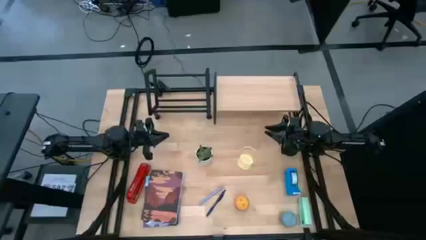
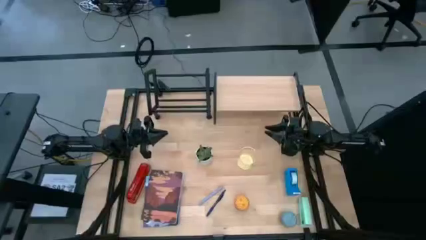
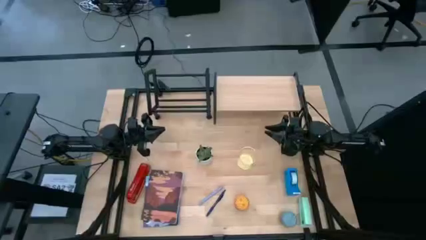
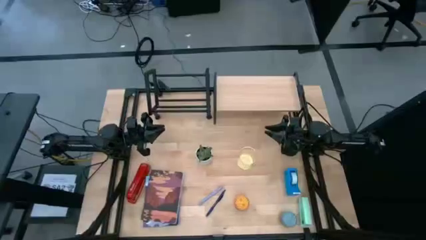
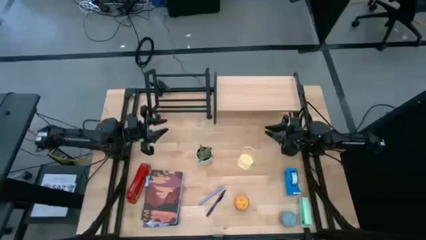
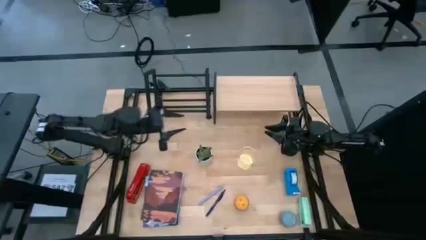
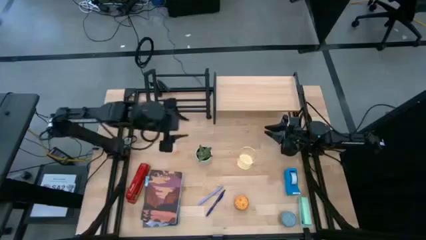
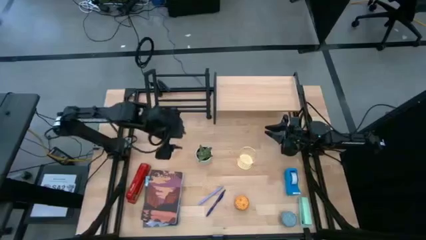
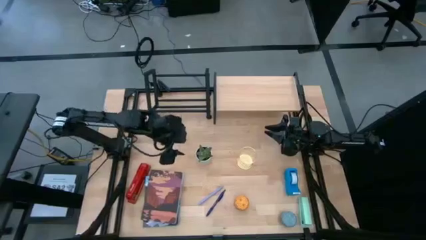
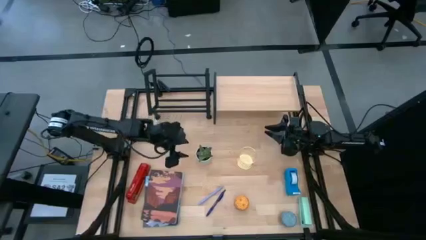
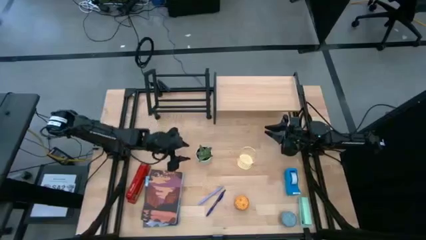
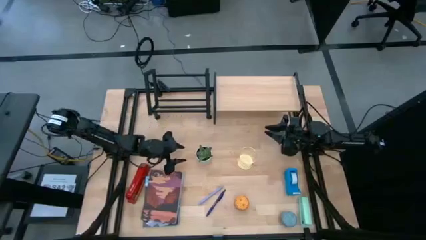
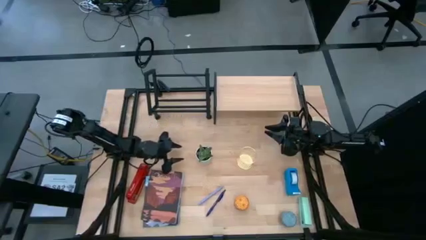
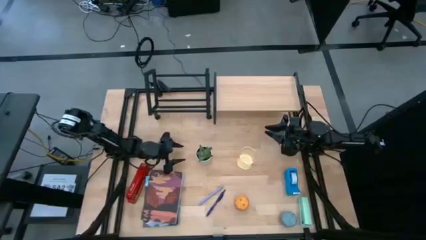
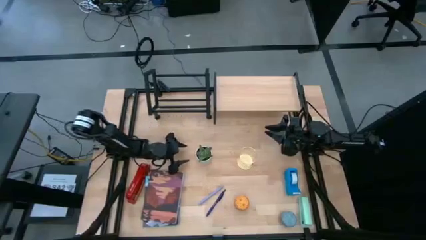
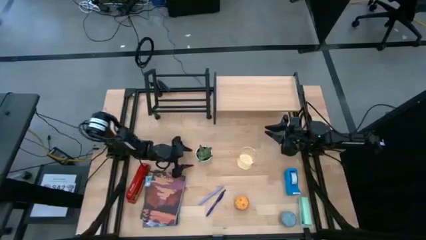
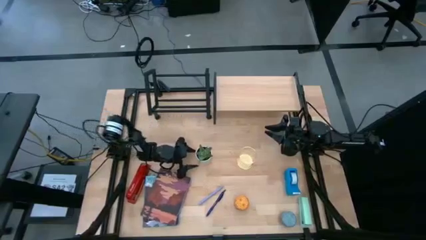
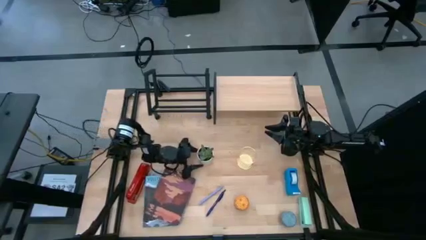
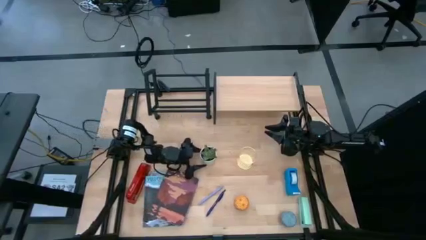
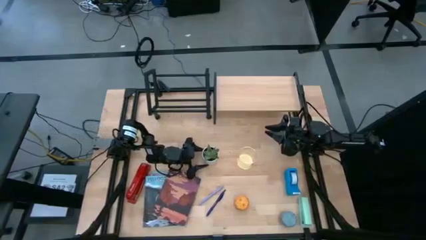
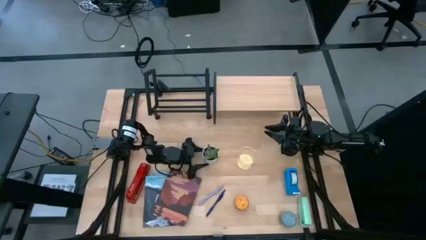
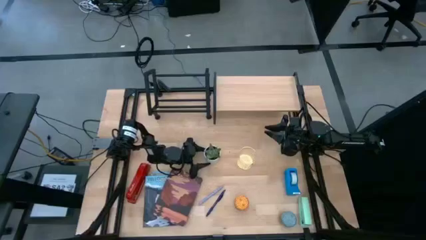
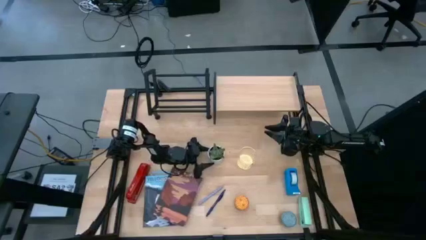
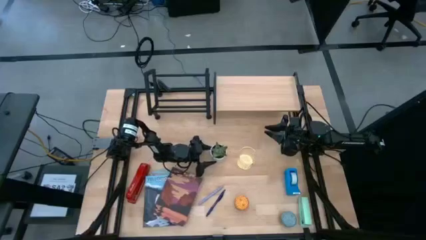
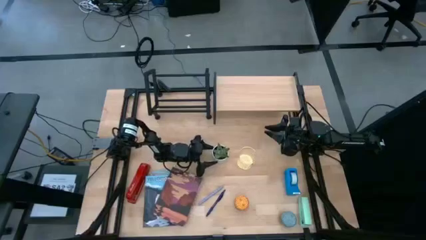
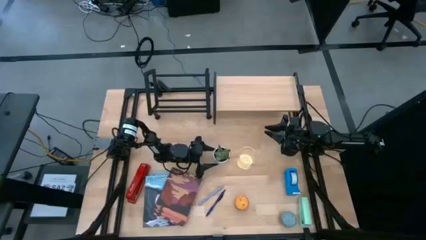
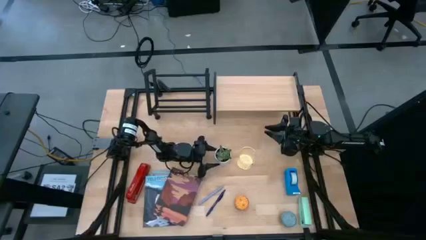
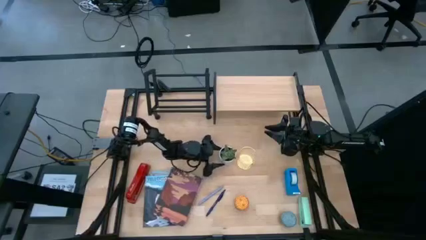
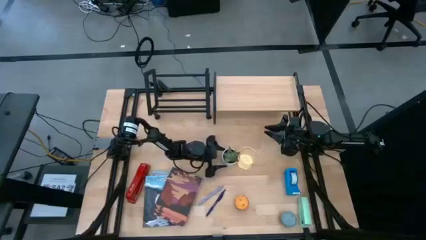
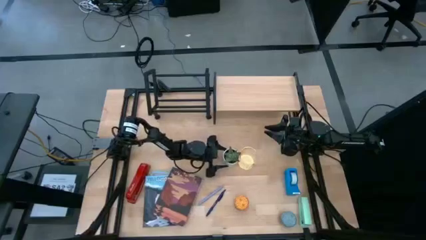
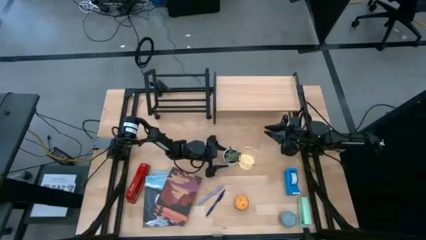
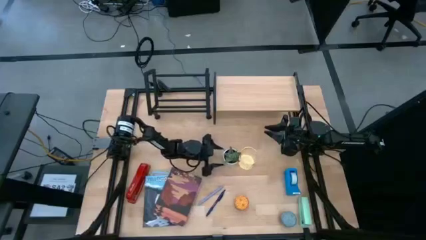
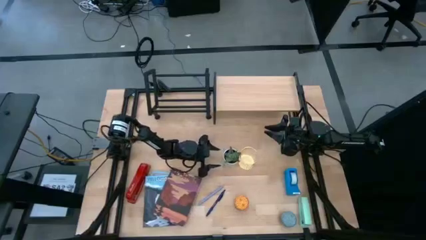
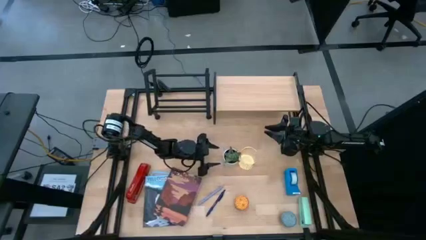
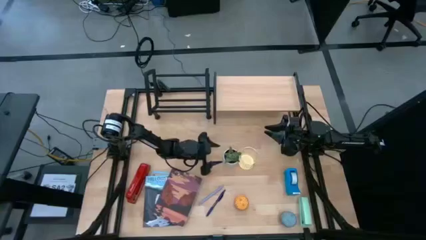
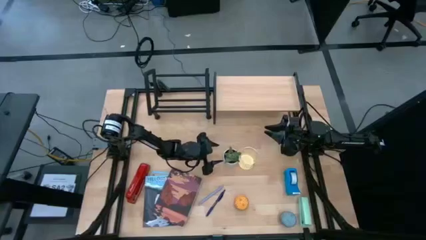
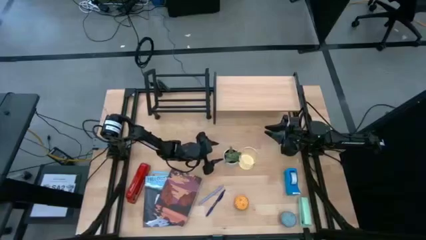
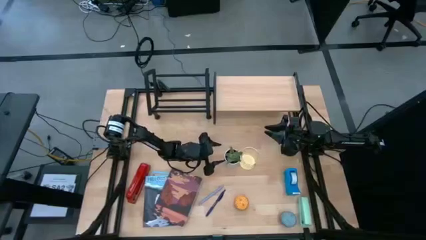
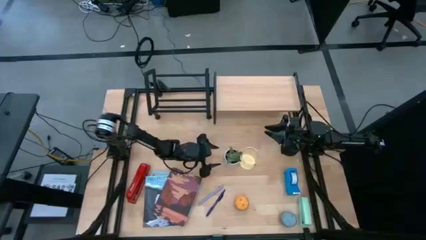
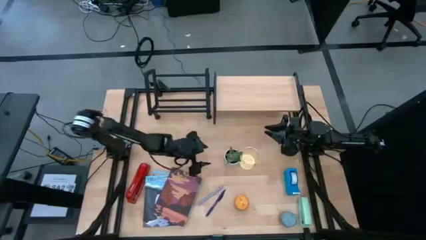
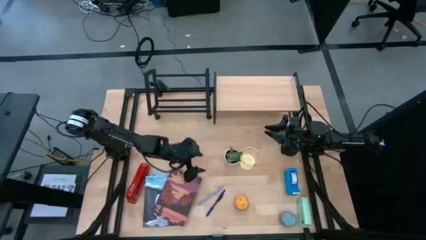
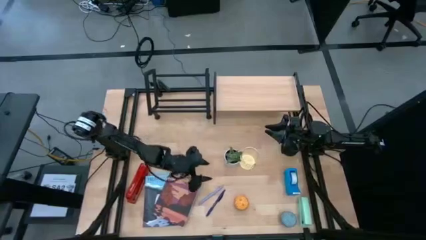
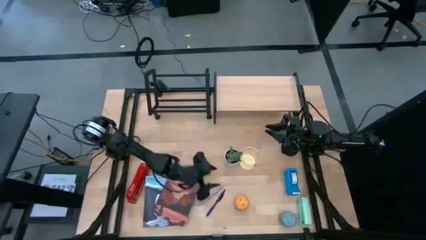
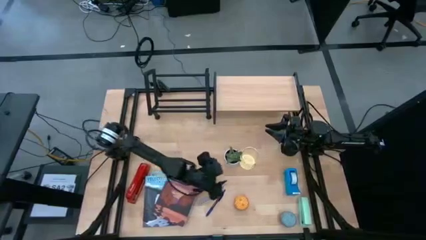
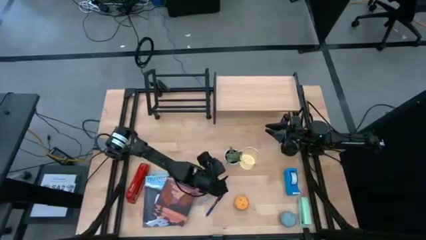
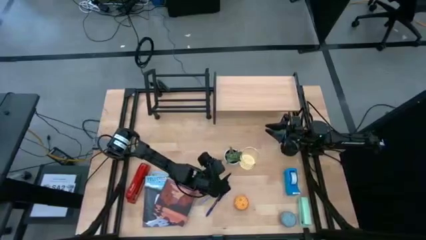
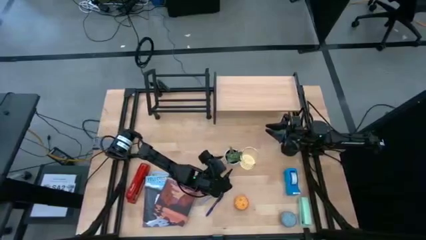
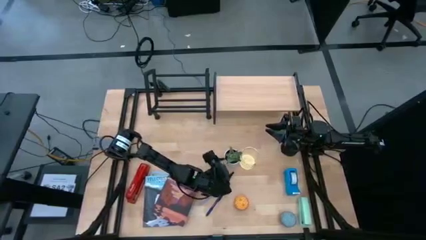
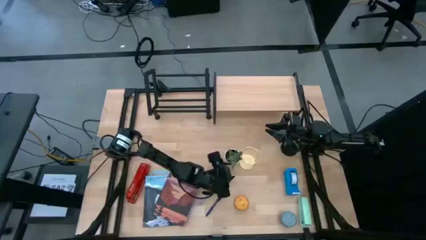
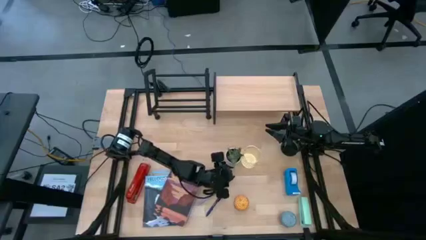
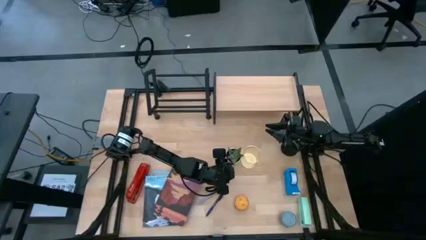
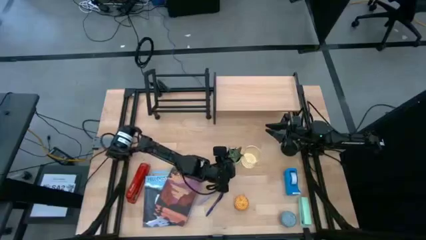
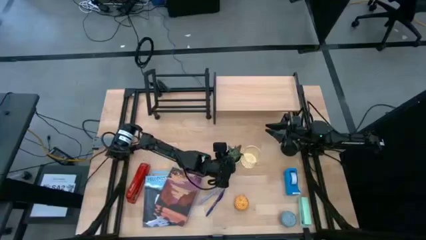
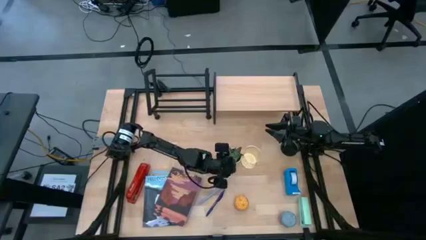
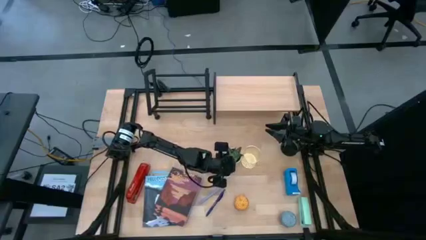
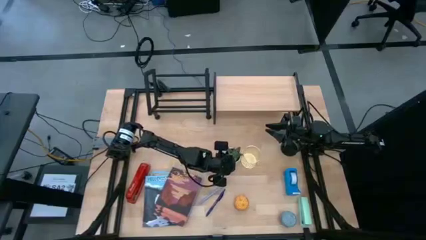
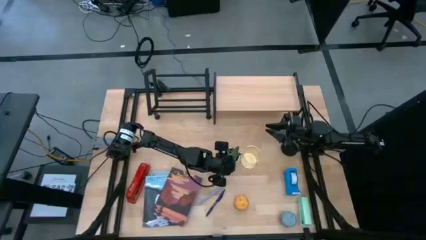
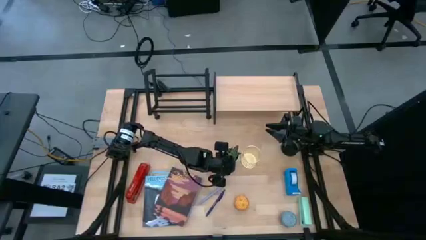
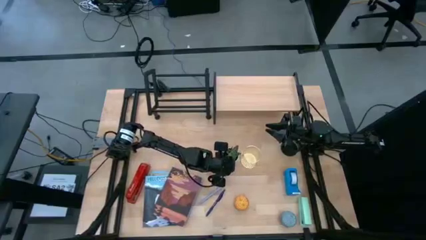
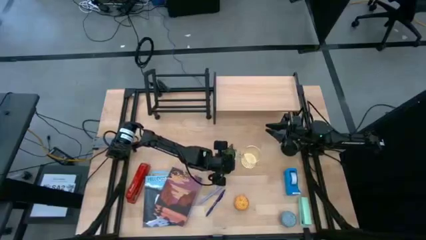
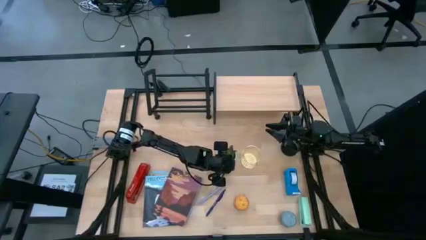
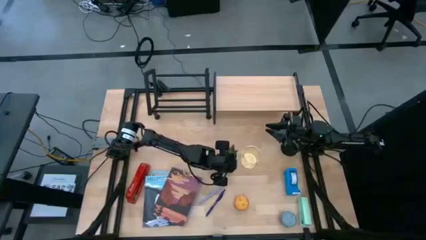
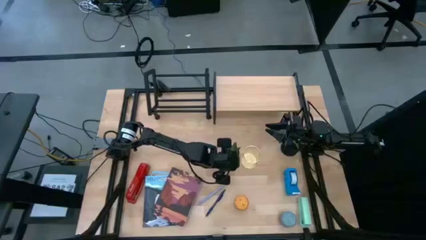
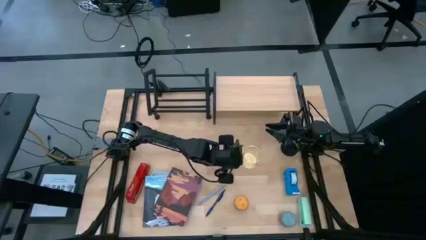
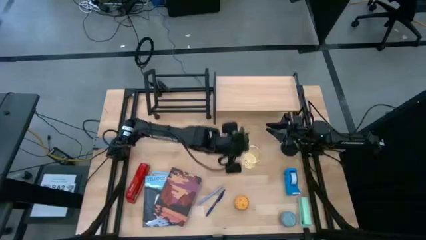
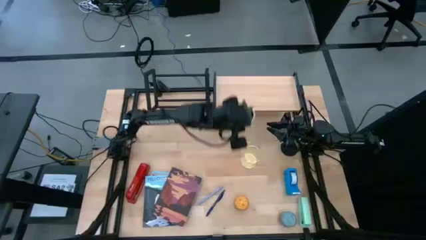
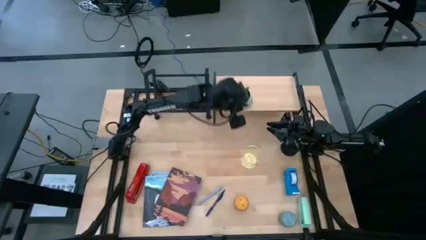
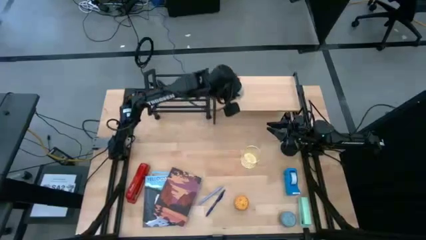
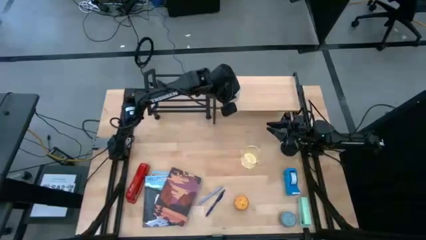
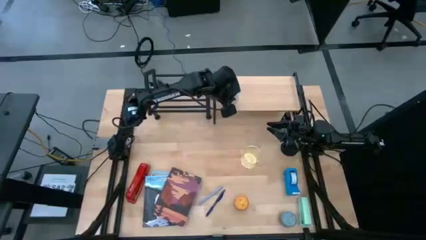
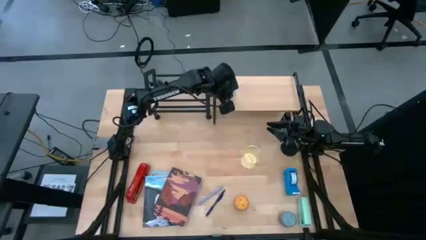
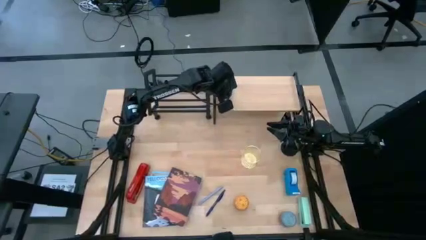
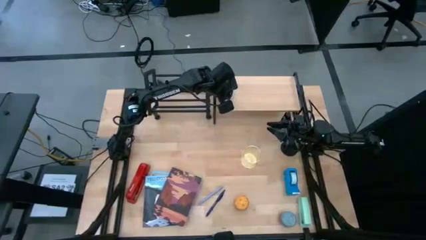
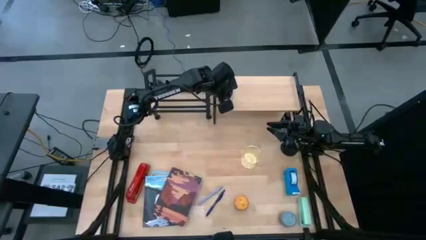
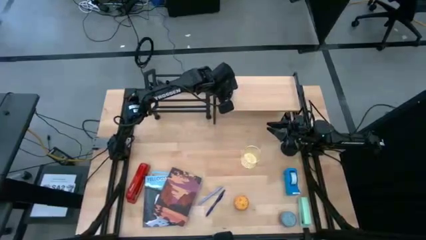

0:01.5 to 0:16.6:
Task: Stock shelves
Put the white potted plant on the shelf
